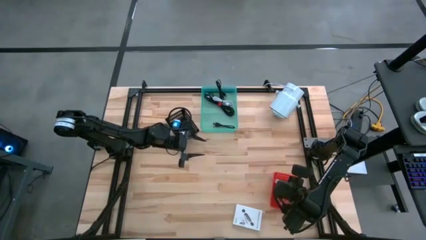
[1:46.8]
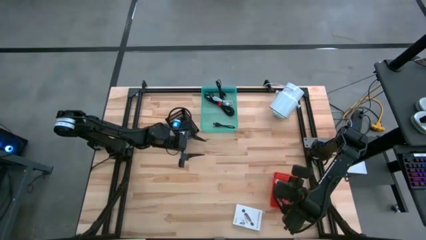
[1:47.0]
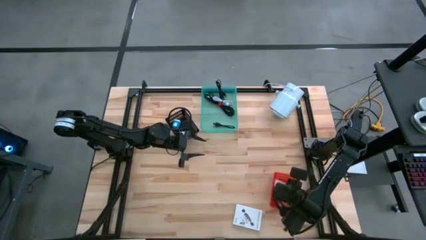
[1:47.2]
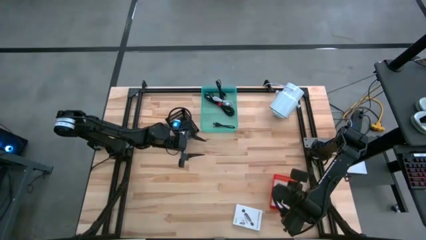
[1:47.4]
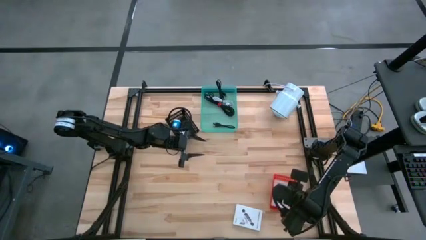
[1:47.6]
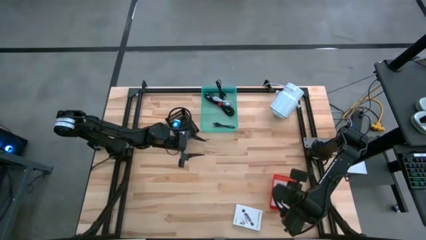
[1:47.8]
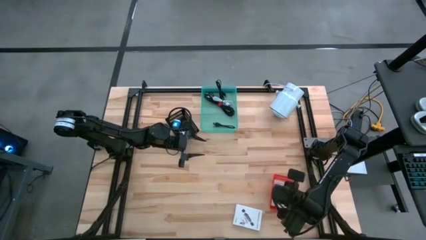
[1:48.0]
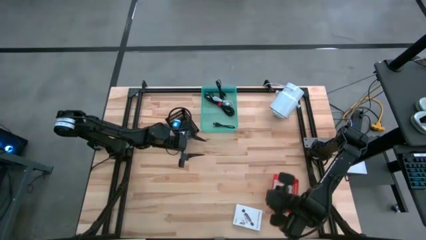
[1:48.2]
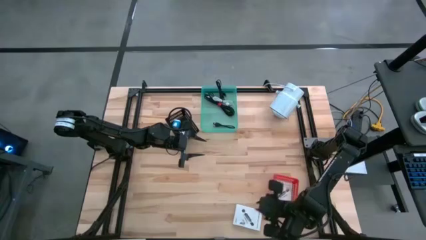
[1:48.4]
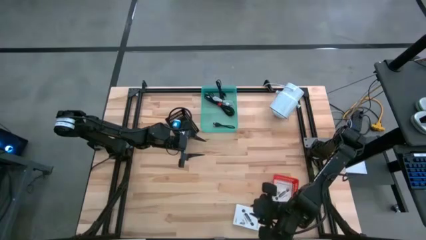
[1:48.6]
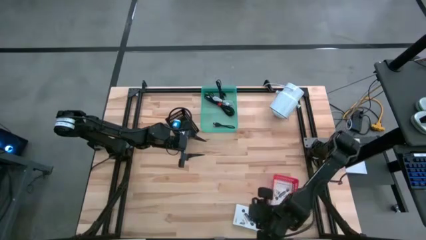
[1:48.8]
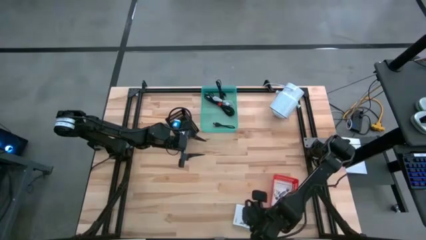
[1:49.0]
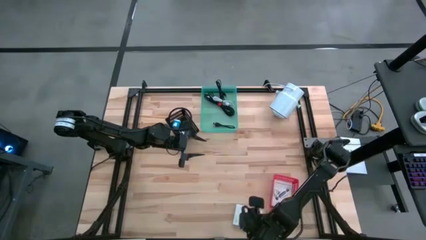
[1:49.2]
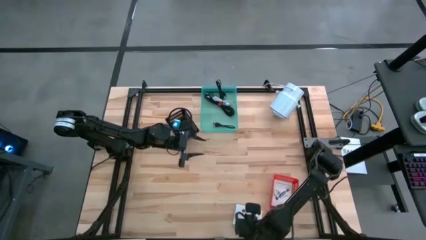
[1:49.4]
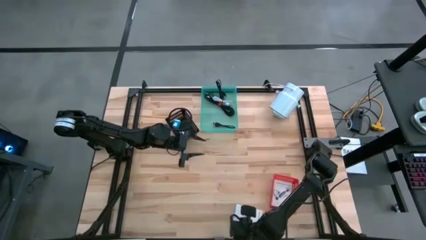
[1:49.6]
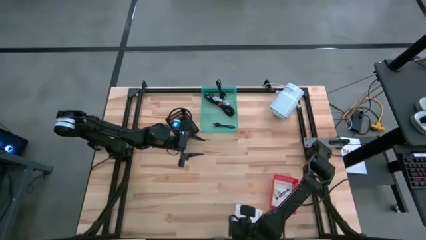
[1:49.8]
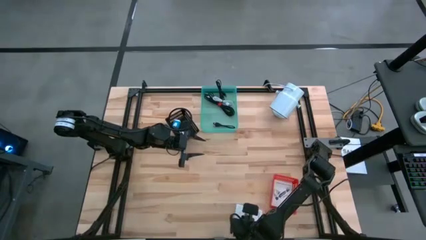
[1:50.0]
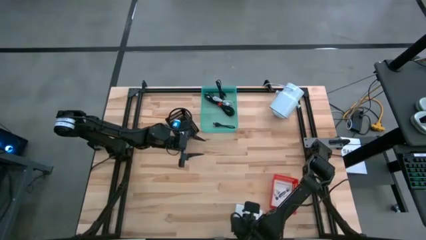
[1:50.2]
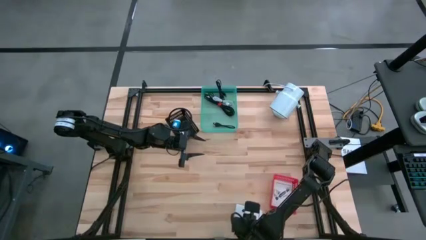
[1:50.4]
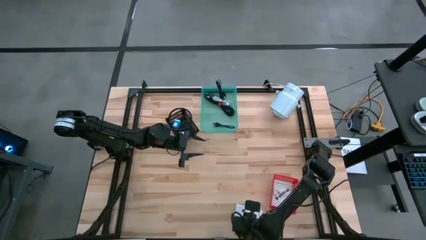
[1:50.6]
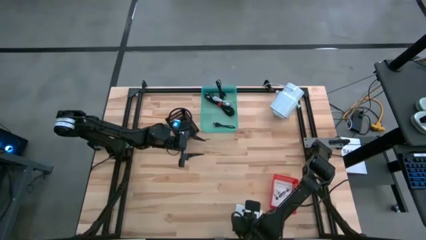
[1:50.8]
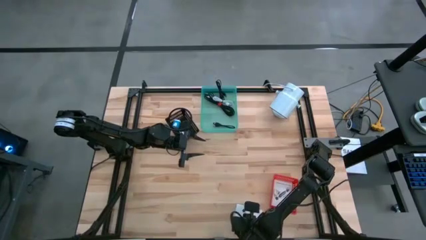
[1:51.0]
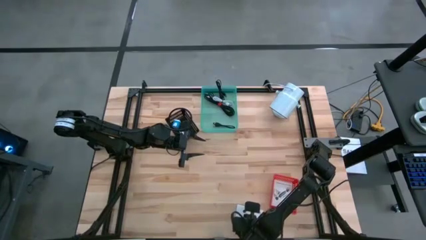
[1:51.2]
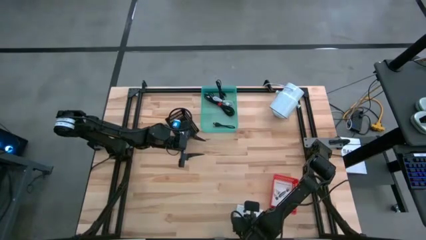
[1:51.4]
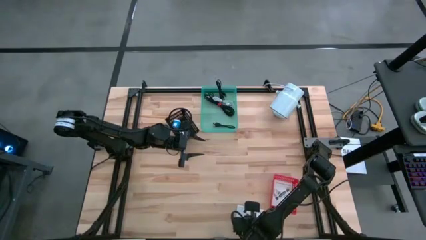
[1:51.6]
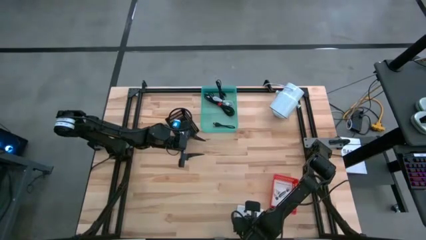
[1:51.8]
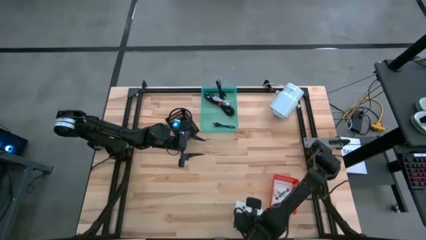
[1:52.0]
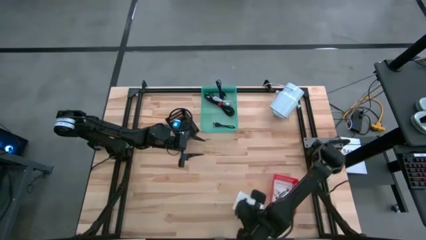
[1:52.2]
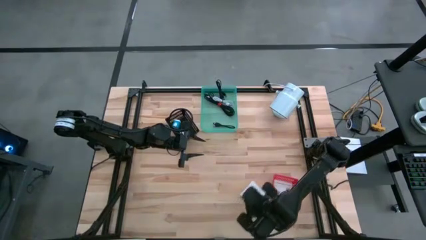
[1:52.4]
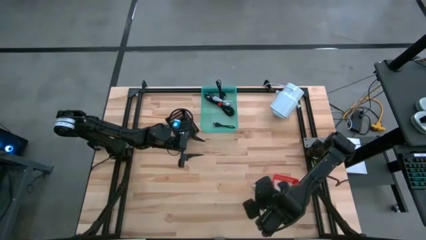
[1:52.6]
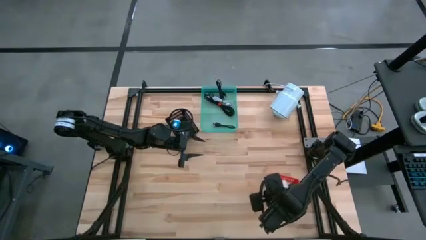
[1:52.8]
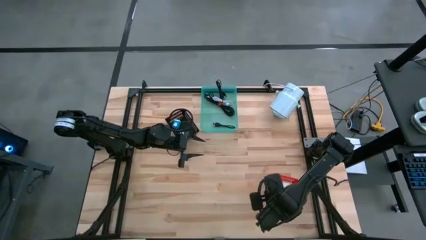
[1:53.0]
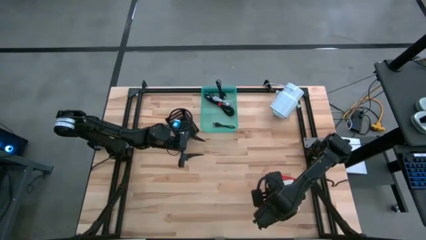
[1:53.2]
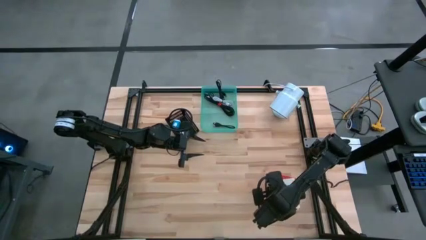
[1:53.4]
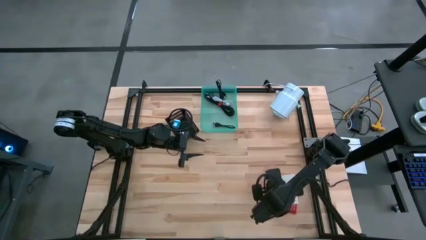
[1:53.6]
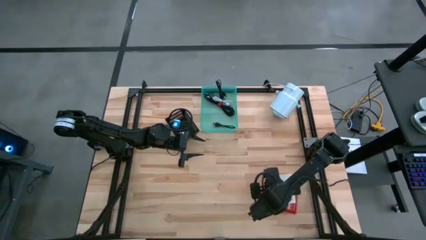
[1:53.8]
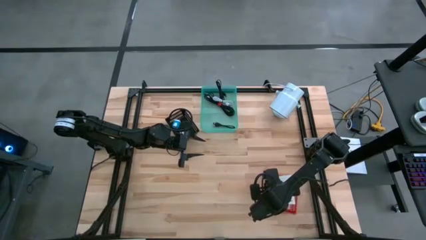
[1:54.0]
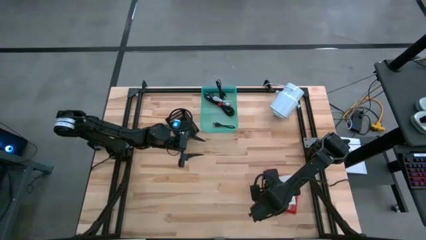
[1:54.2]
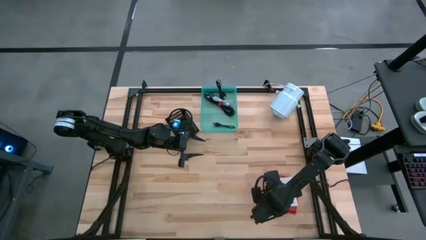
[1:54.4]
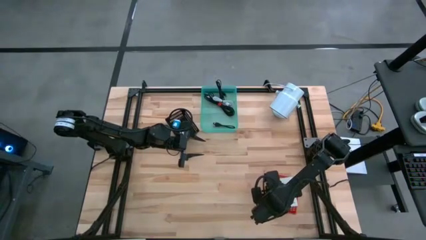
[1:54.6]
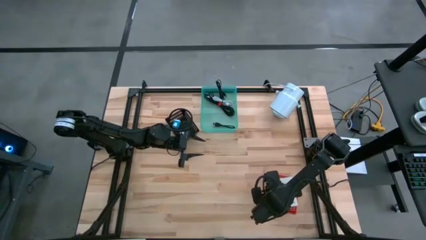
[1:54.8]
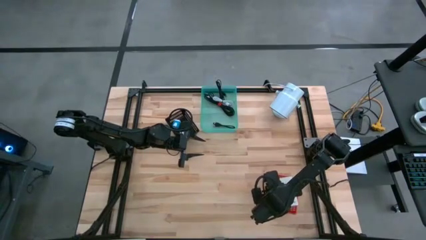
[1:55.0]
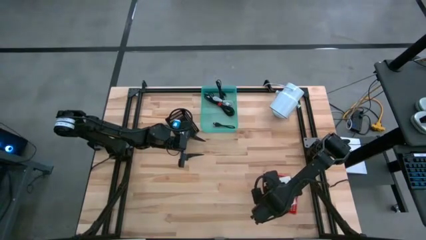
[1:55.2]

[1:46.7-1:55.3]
Task: Pick and place items into bin
Put the white card reader box into the red bin

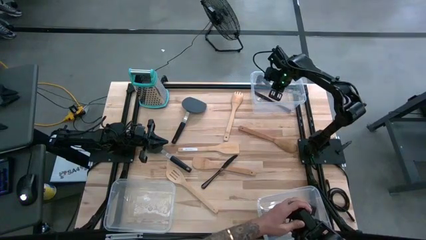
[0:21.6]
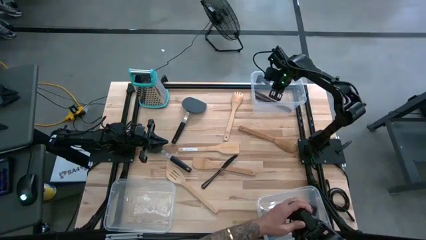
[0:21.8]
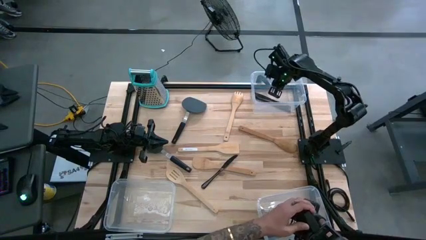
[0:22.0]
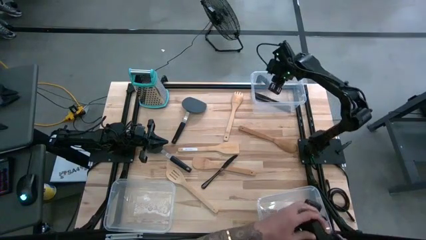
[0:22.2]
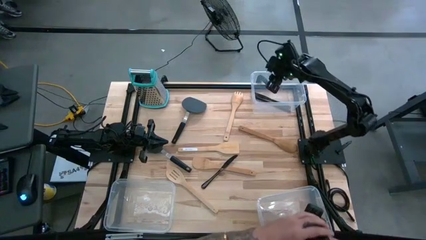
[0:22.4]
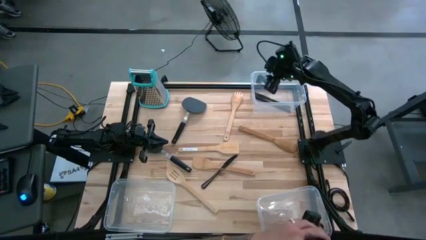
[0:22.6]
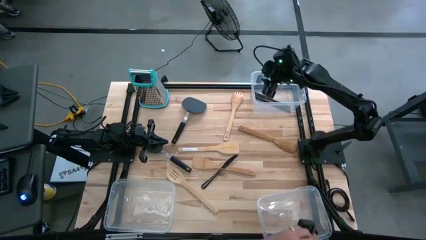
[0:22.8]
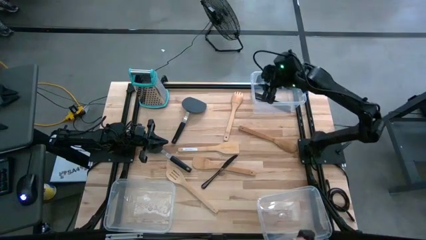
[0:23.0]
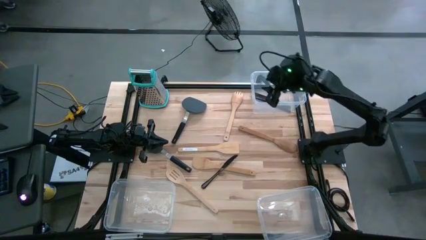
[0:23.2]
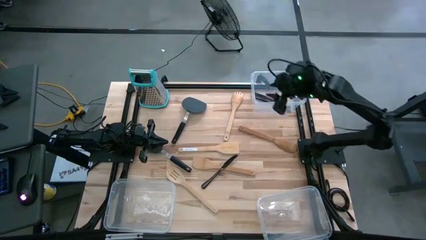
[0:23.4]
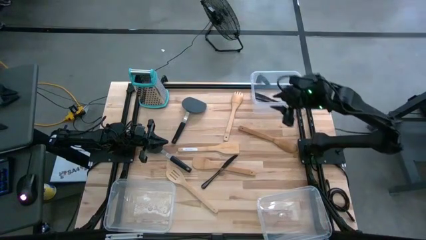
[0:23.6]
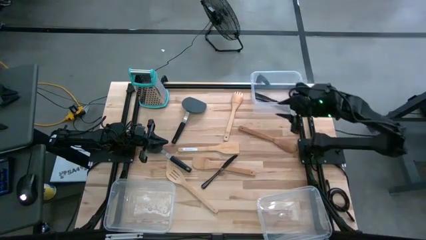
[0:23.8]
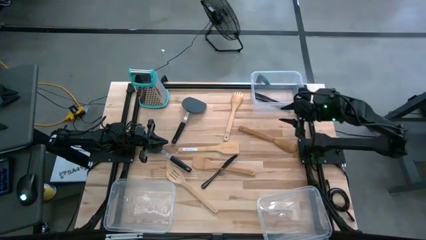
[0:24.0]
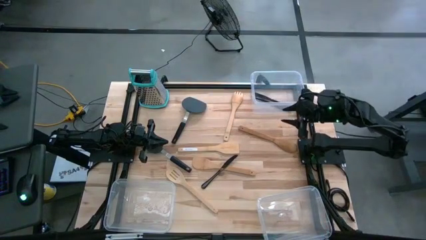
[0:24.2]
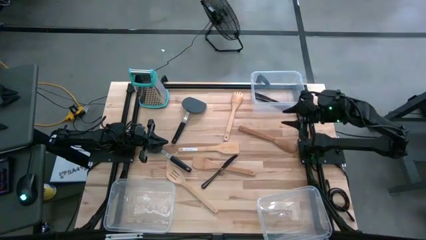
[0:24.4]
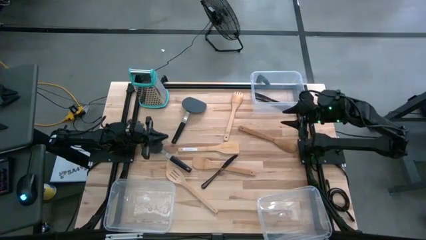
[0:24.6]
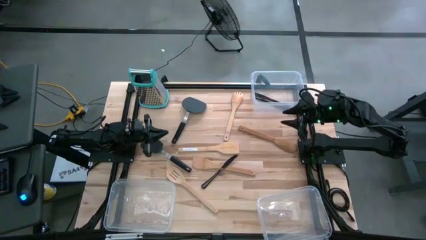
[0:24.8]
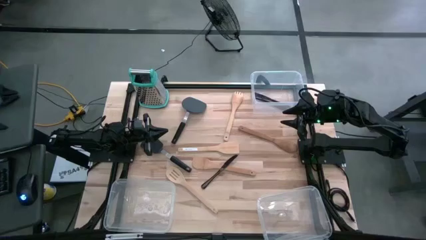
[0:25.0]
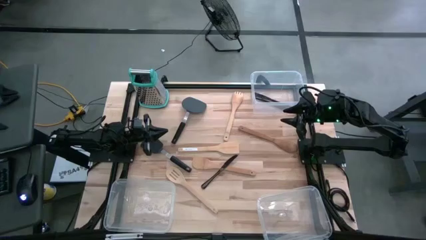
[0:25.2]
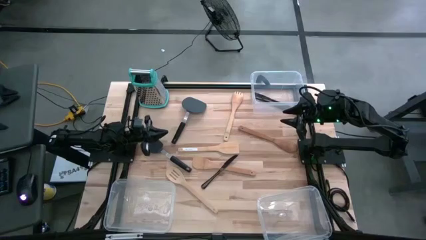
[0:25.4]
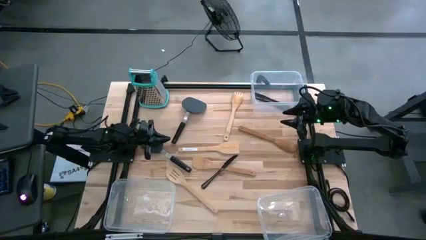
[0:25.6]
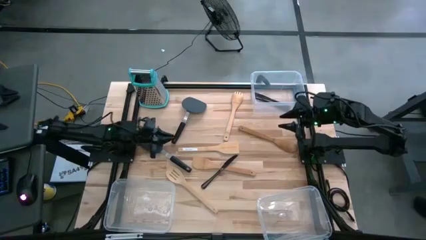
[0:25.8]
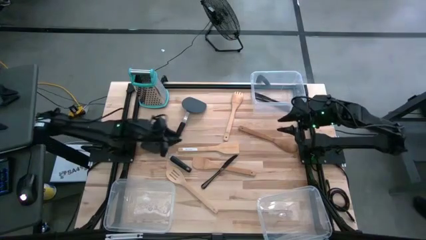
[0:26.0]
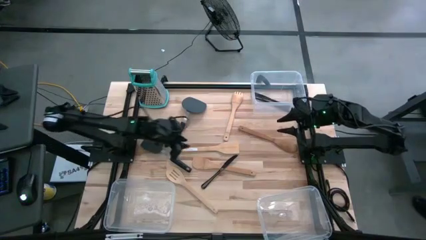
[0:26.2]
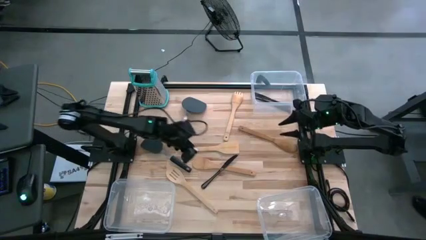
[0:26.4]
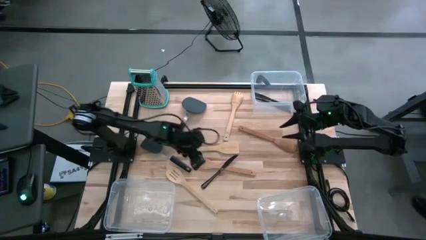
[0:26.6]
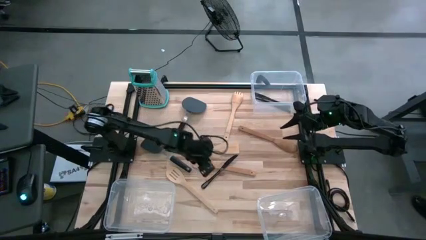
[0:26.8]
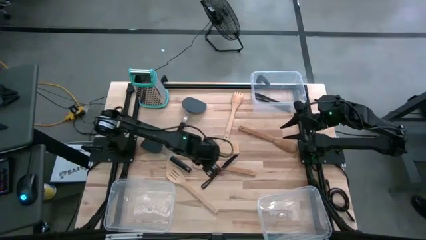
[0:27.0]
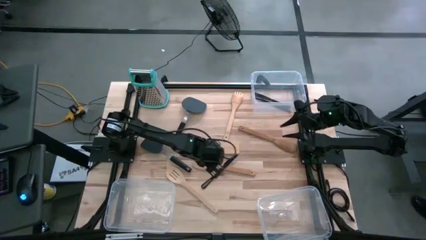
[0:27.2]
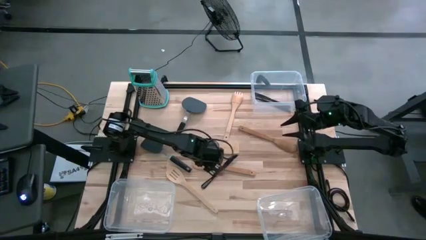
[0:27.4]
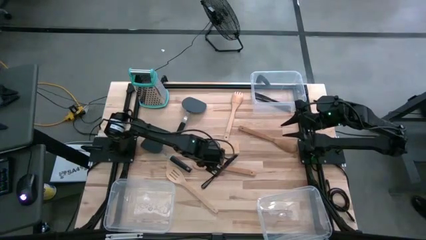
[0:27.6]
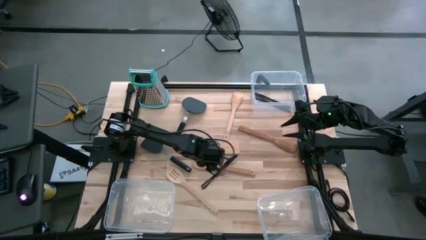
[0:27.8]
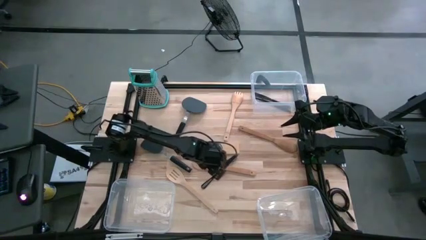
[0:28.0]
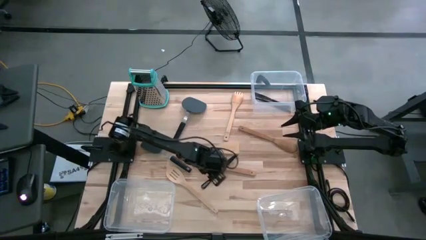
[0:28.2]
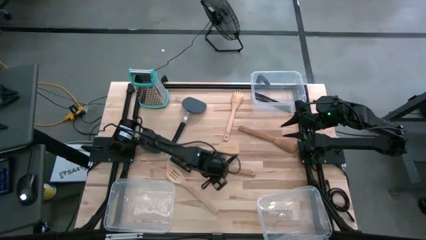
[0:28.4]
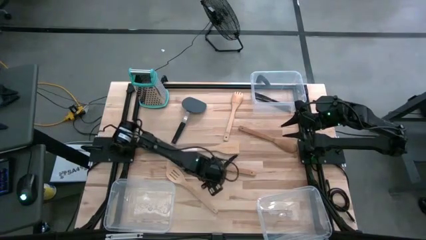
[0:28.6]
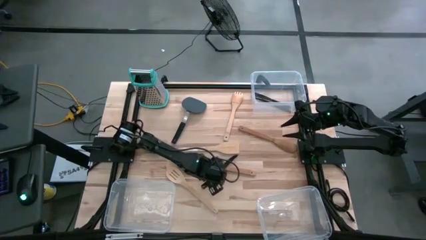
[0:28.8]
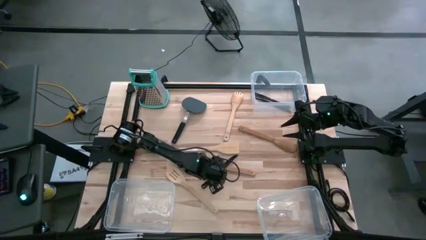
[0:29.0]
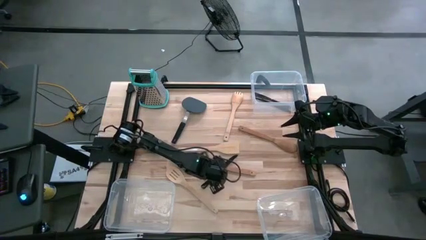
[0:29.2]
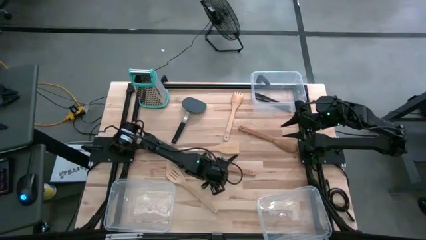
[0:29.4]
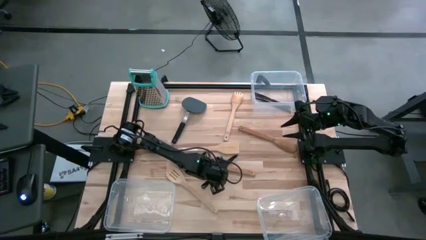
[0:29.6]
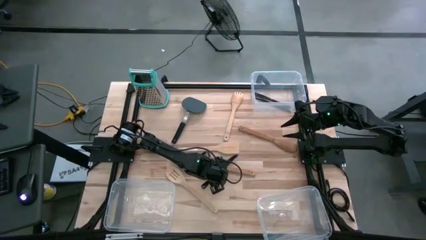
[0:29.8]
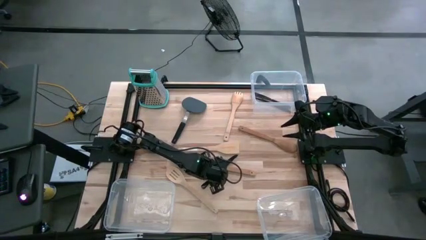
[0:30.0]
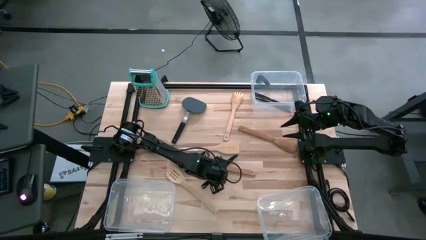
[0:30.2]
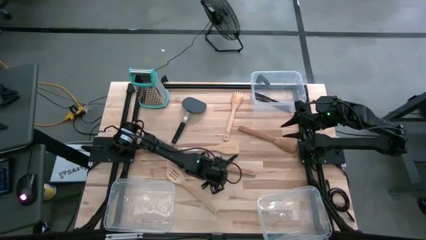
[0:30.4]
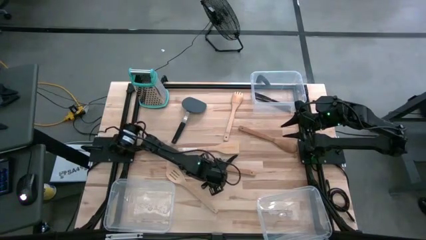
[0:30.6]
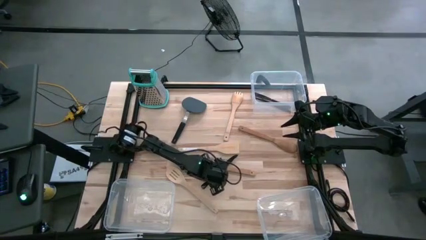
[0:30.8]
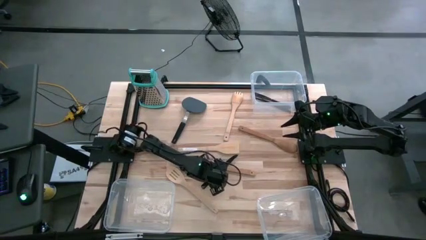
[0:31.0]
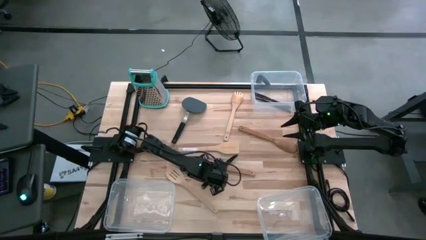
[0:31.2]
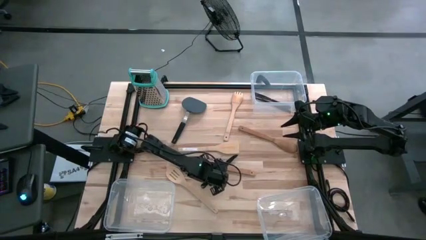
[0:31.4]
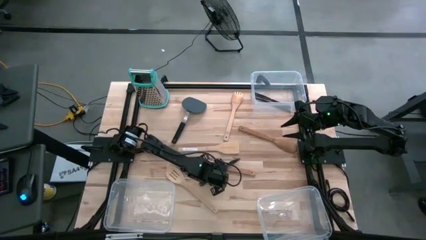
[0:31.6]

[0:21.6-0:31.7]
Task: Pick & Place Kitchen Items
Put the black knife into the transparent bin
